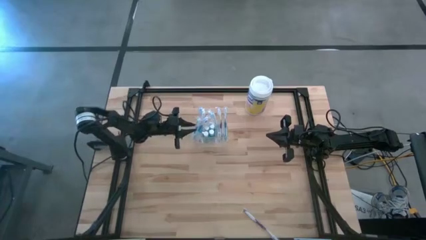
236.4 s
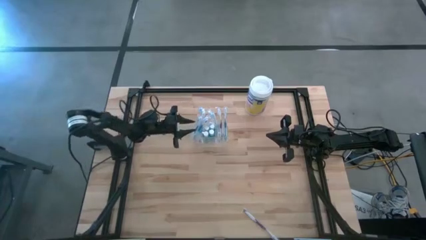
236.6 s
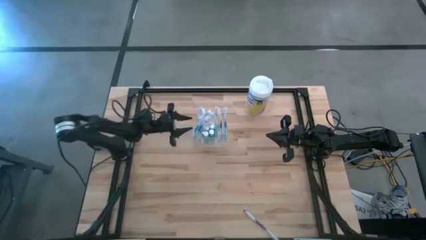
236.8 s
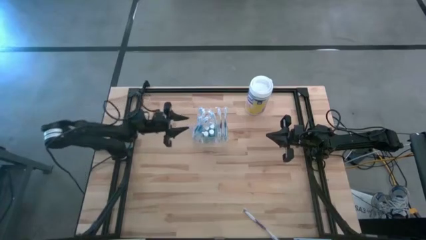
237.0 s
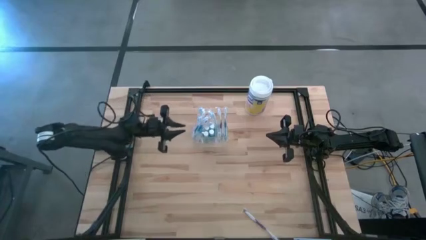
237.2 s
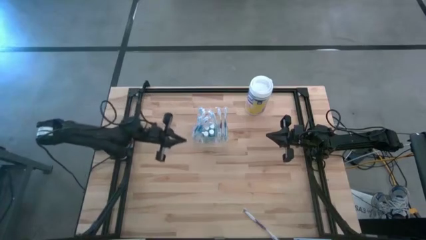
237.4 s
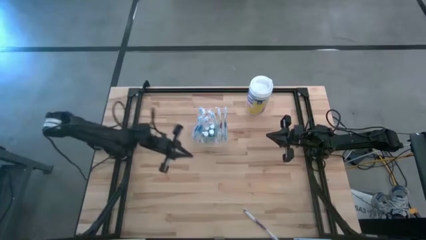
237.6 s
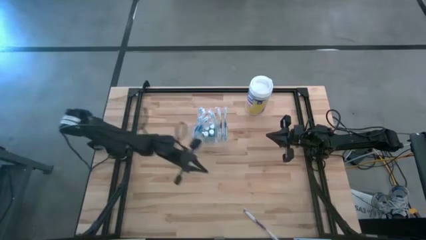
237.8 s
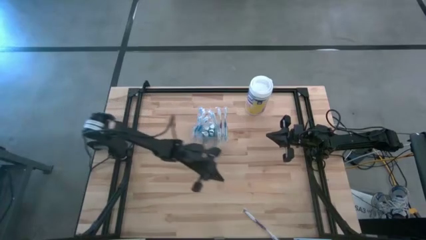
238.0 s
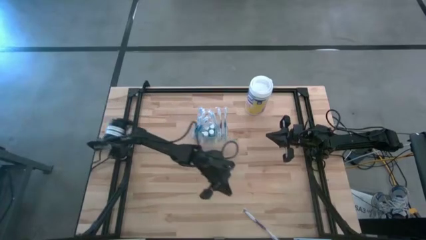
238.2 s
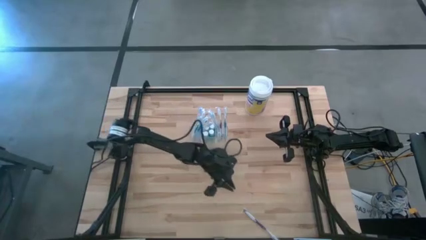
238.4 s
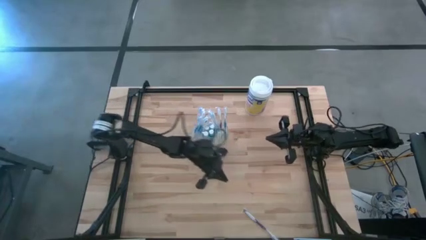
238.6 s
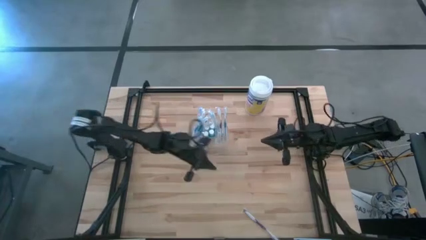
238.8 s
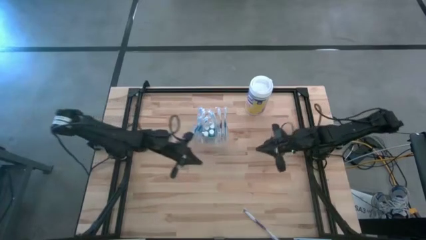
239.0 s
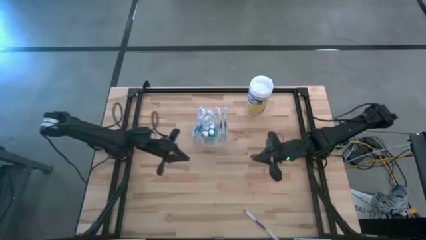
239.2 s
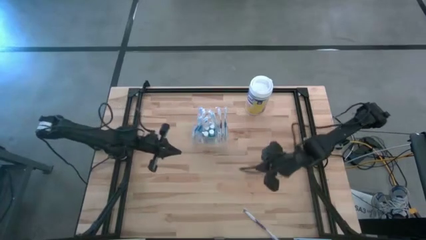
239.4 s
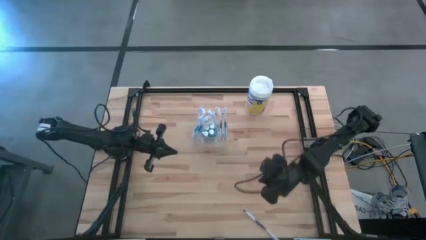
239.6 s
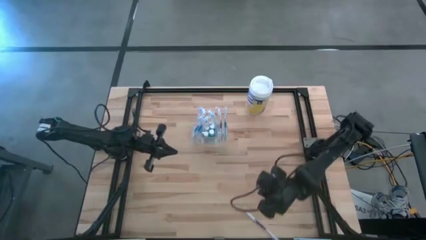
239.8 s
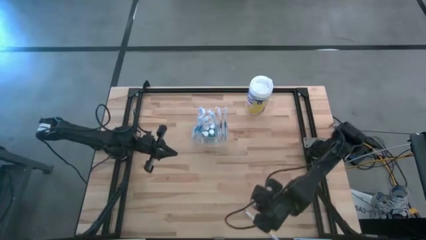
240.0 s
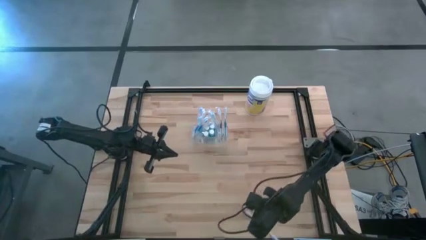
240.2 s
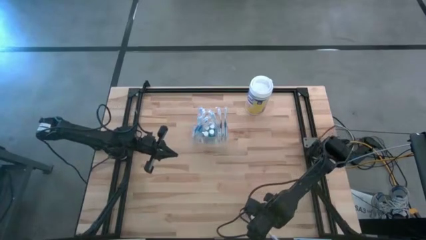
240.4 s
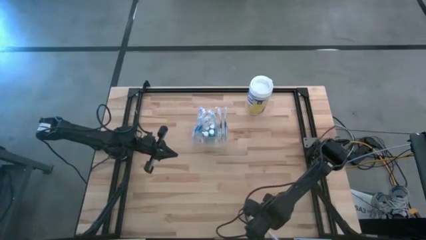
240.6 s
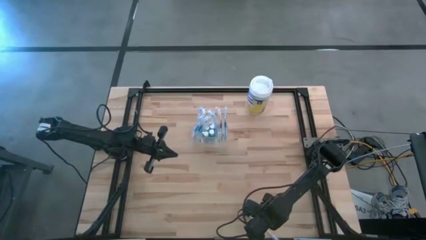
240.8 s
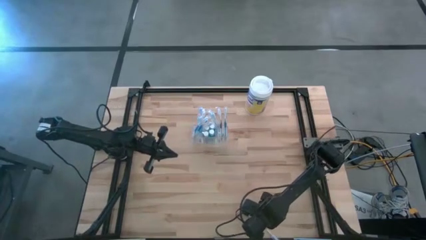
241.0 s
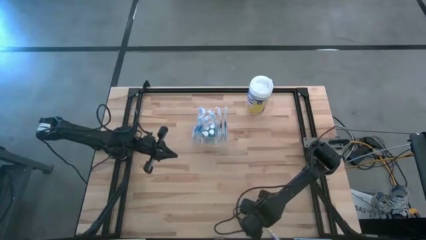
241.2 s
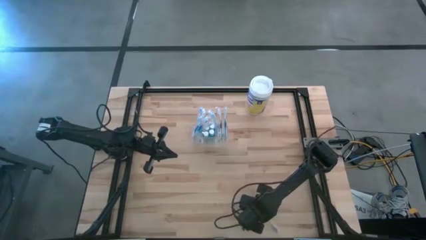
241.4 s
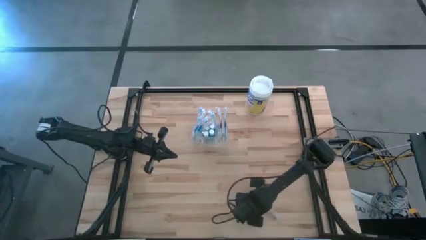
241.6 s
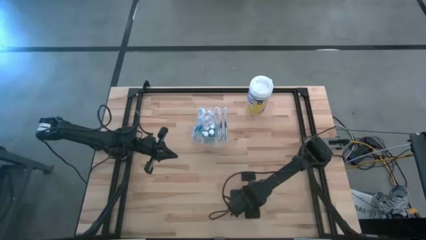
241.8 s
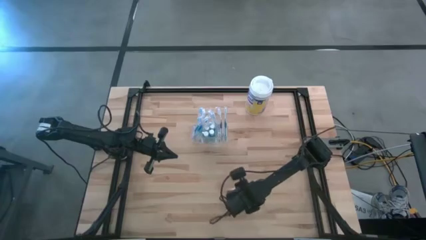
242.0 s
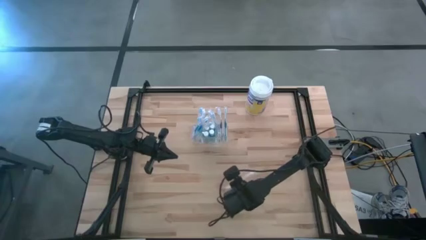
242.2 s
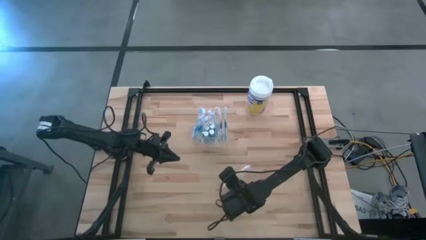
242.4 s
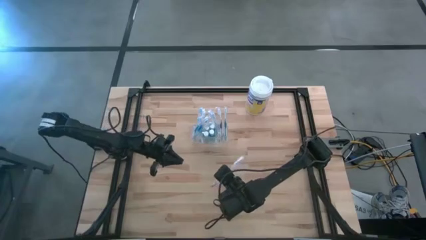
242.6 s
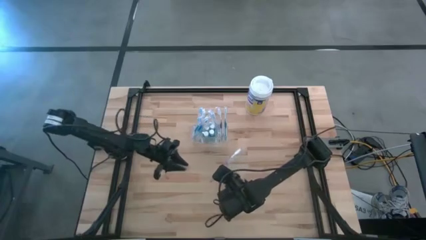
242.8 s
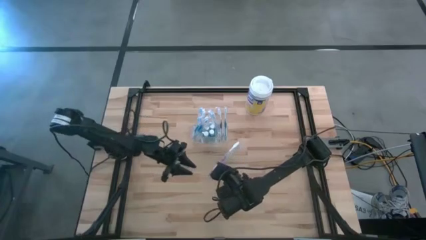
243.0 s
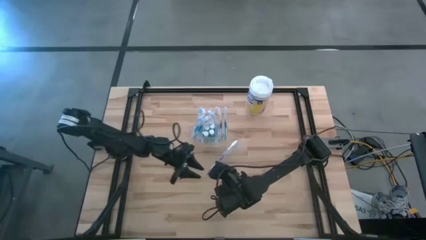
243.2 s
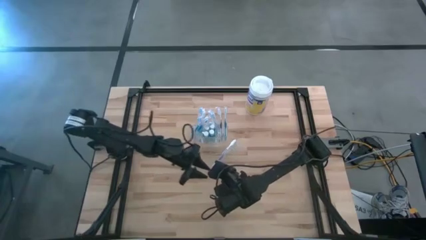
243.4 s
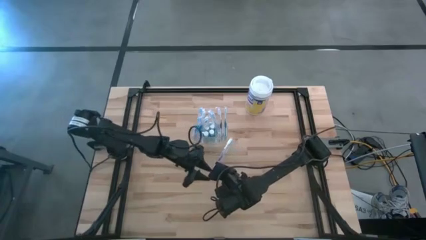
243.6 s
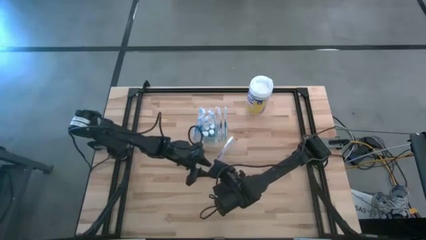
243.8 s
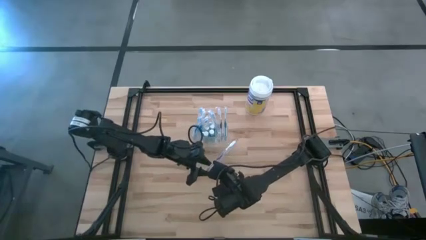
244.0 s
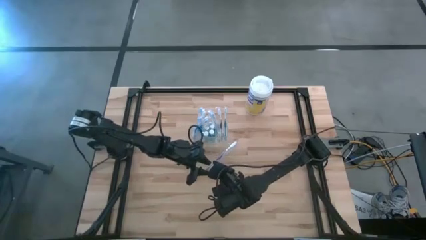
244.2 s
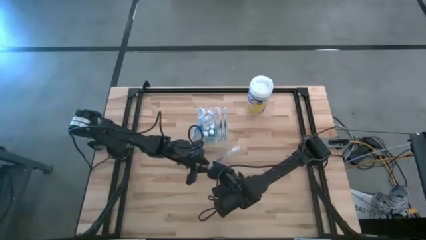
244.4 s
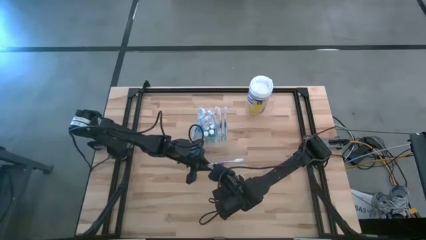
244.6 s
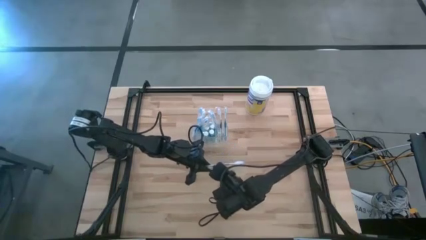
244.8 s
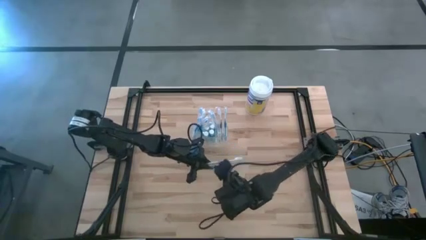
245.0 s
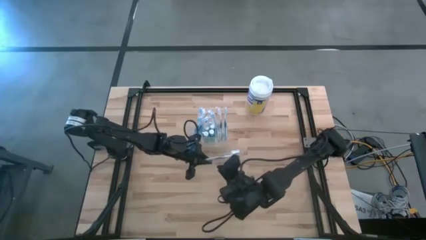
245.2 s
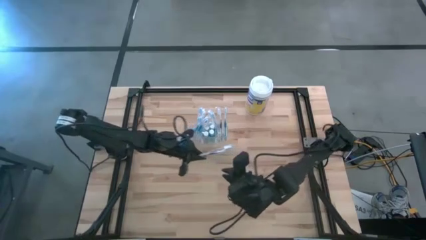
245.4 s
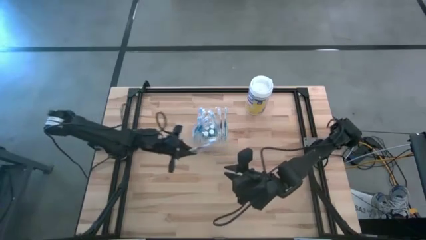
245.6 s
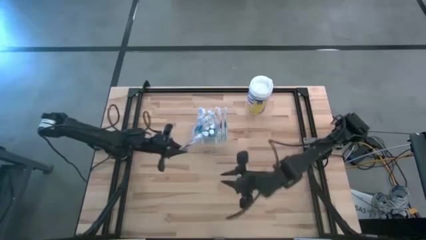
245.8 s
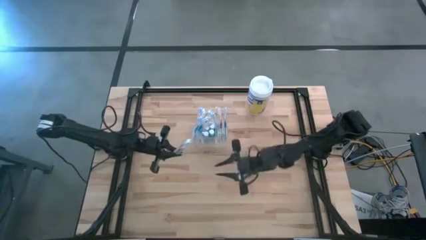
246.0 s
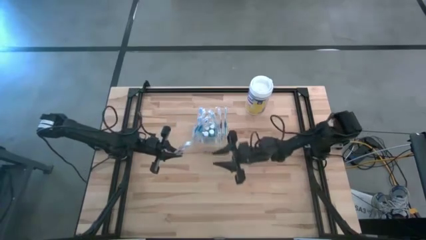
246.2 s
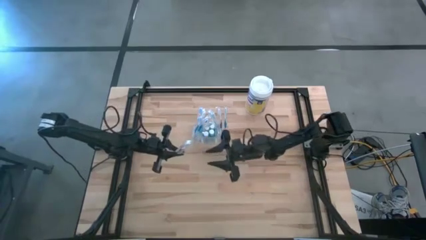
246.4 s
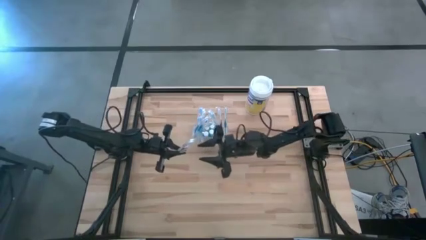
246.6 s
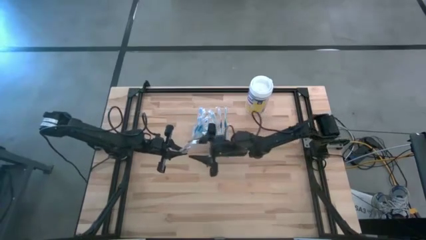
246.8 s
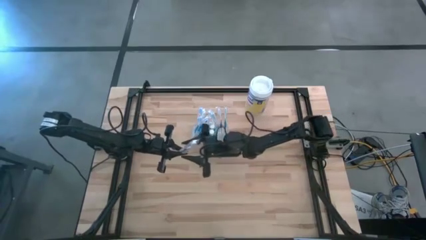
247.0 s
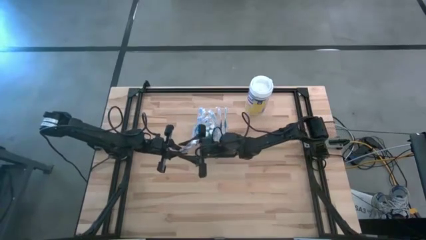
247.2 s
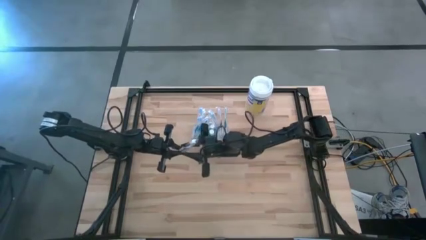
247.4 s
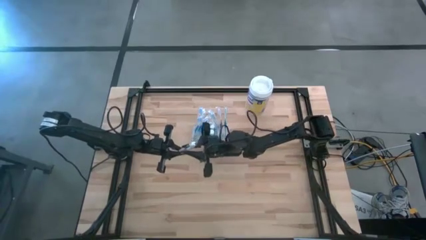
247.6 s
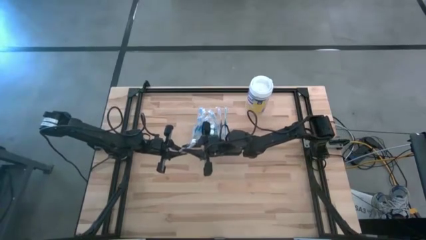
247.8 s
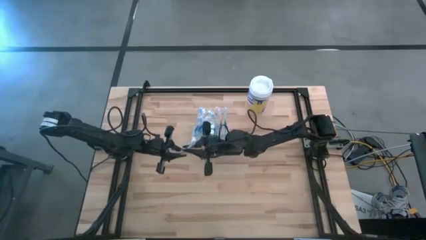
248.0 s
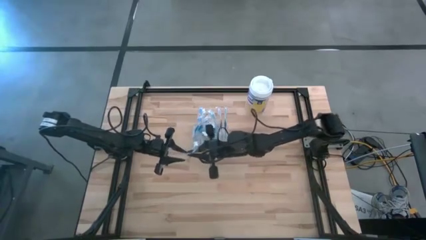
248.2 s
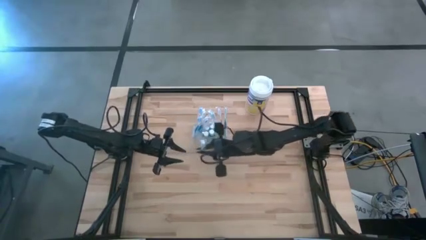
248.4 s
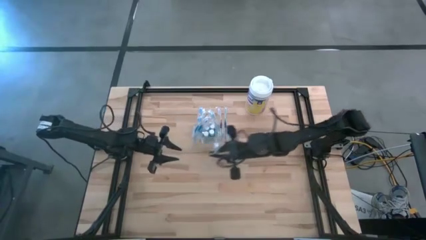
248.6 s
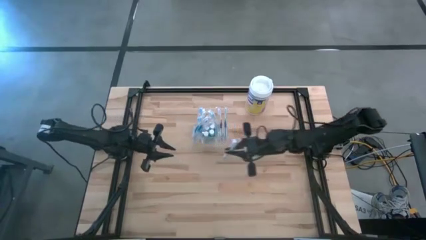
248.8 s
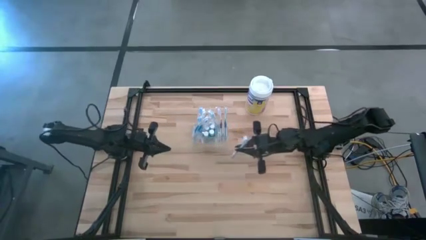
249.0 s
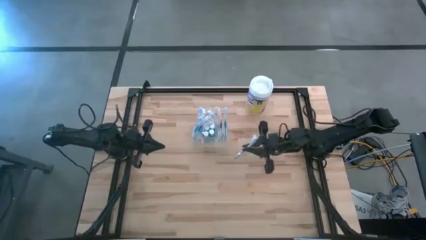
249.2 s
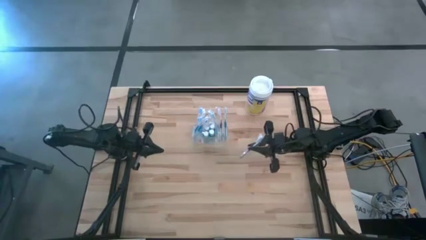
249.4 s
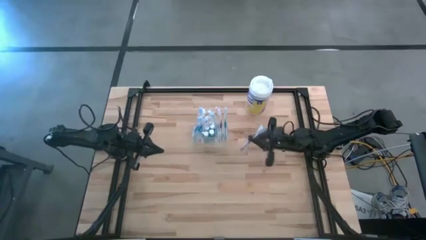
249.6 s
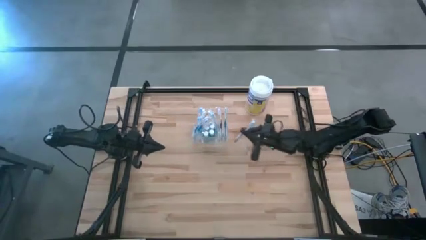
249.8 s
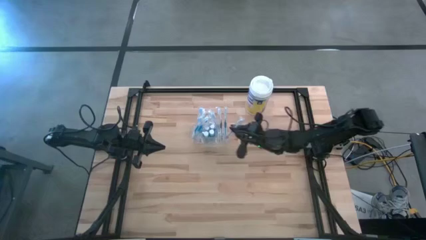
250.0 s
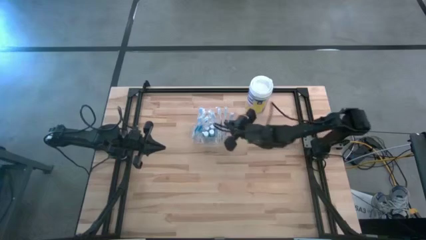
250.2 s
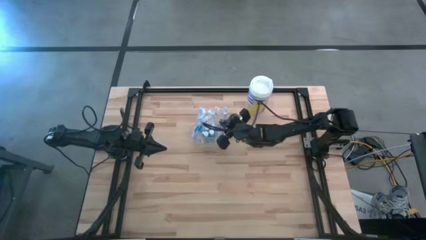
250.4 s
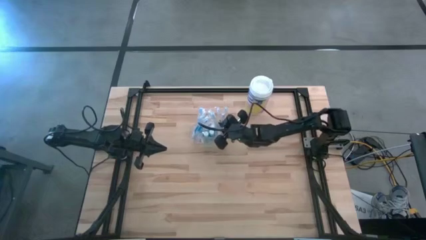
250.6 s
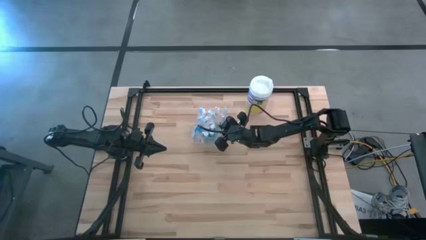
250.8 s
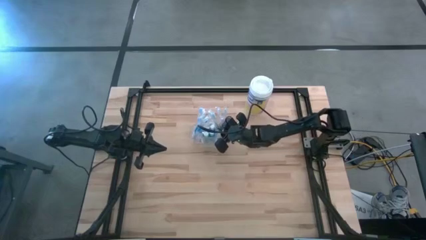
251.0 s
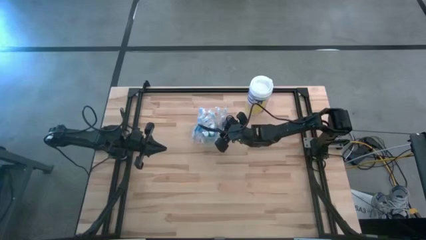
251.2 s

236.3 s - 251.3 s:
Task: Pick & Place toothbrushing station
Put the purple toothbrush into the transparent organizer

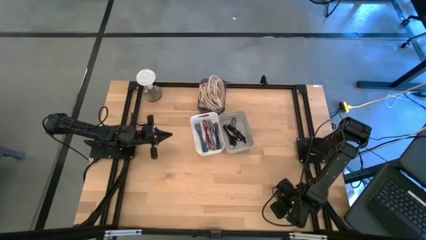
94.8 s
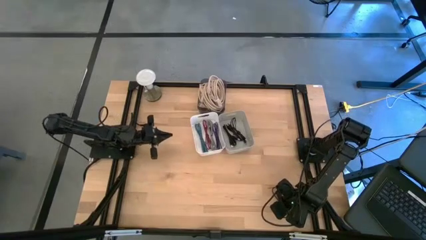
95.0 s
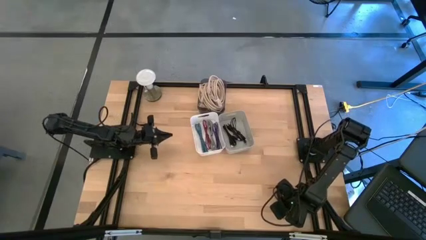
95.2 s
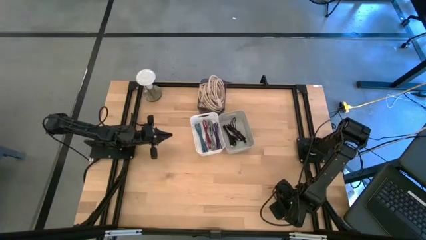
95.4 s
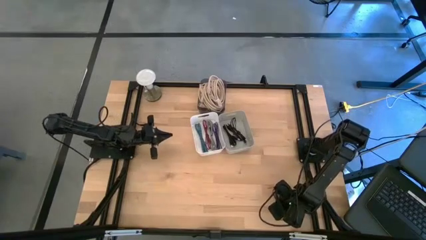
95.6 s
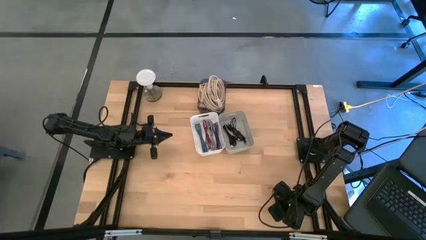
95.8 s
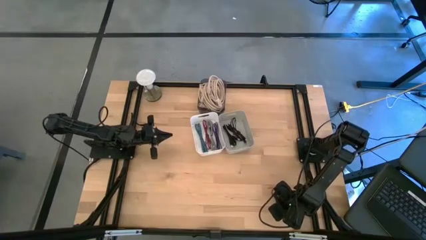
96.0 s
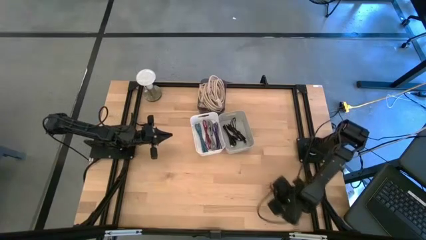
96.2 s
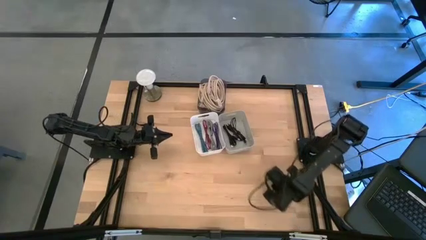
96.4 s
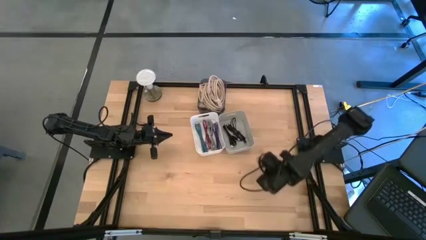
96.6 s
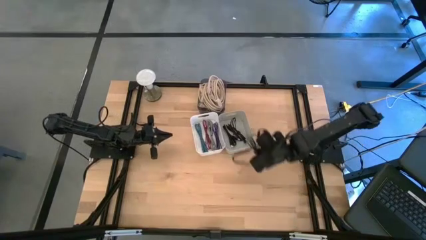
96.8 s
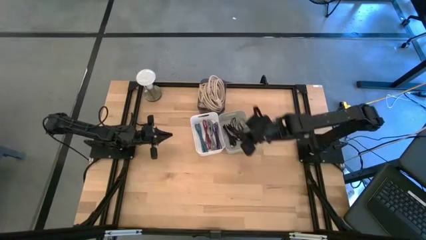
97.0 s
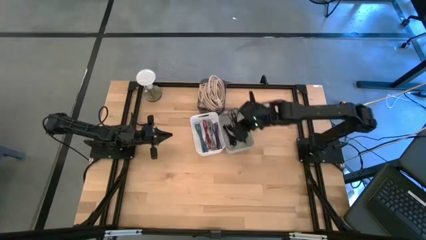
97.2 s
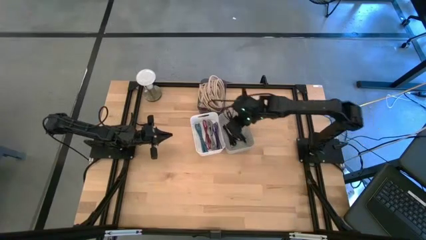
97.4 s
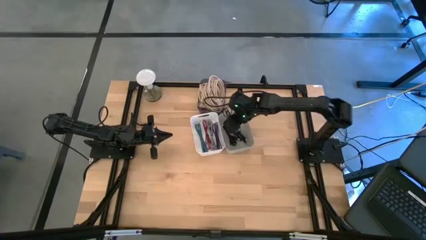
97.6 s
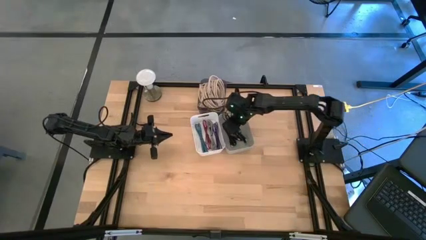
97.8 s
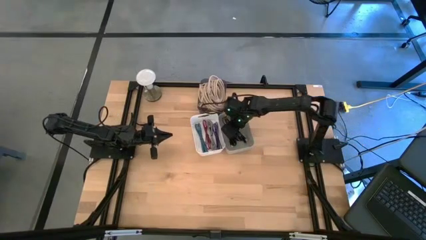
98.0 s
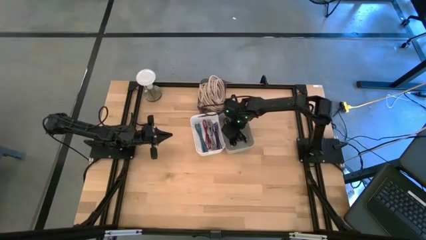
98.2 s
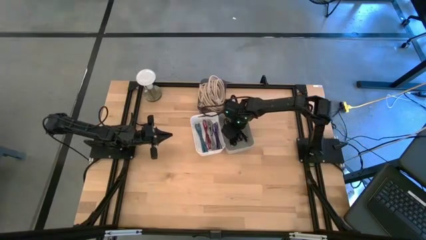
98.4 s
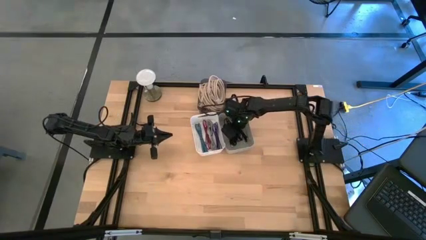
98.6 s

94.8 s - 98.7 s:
Task: Pick & Place USB Port
Put the black charger cable into the gray bin
